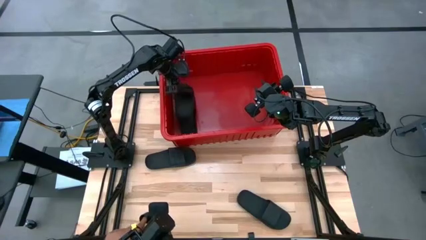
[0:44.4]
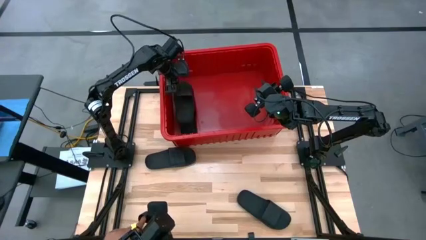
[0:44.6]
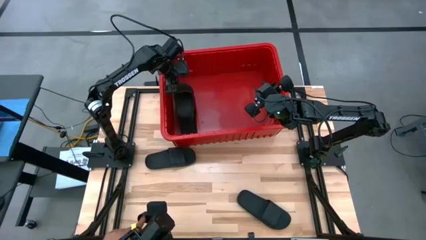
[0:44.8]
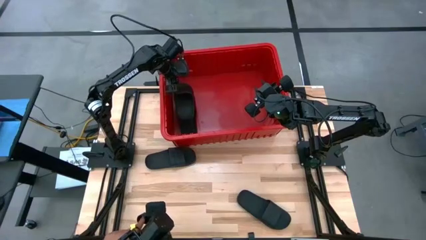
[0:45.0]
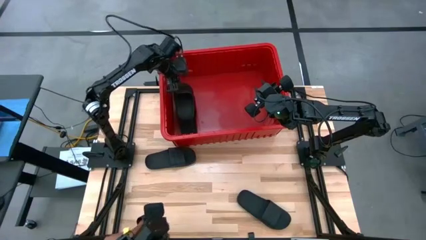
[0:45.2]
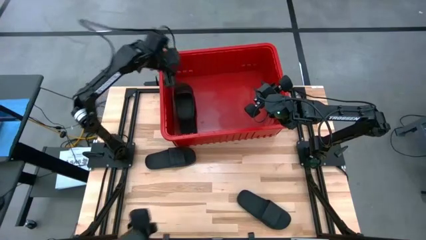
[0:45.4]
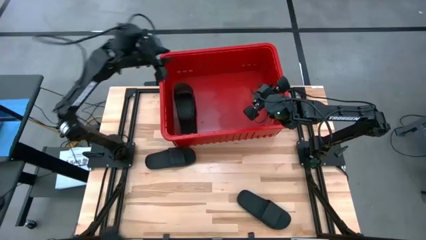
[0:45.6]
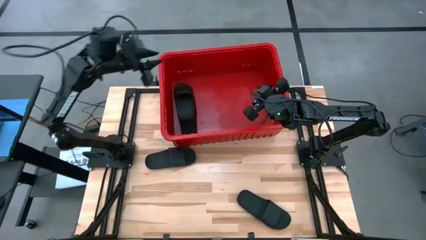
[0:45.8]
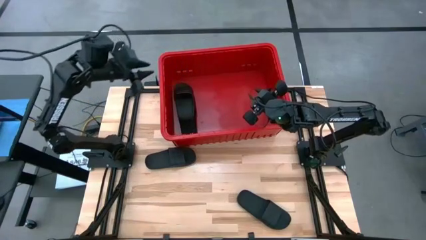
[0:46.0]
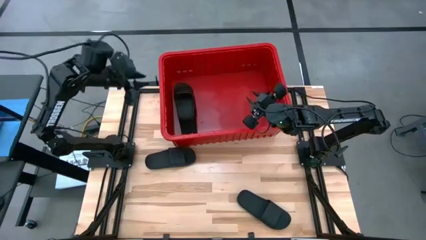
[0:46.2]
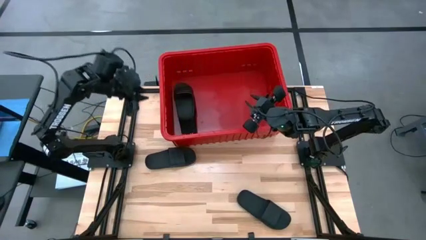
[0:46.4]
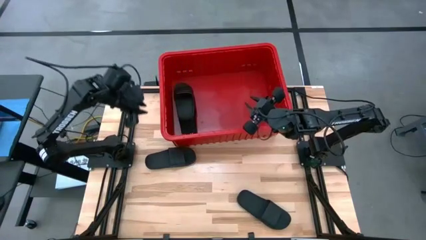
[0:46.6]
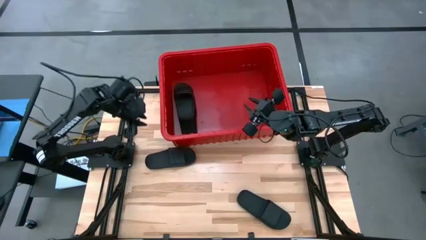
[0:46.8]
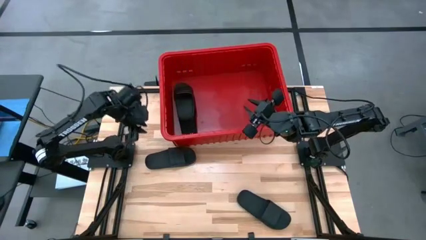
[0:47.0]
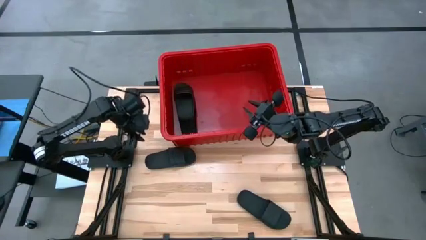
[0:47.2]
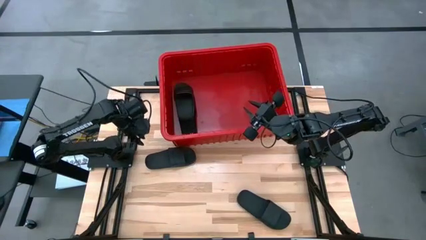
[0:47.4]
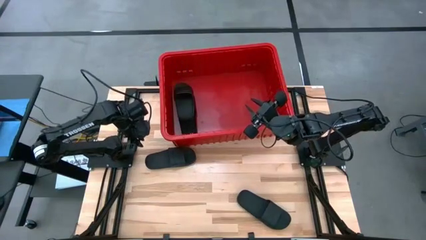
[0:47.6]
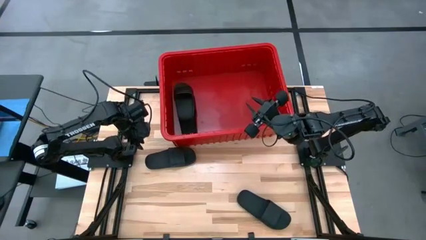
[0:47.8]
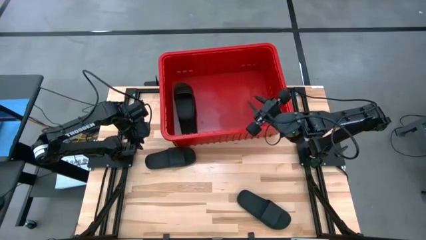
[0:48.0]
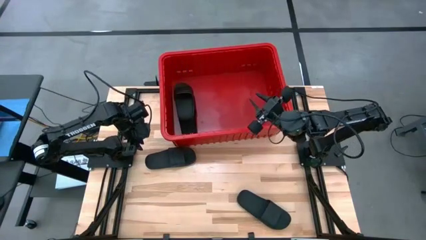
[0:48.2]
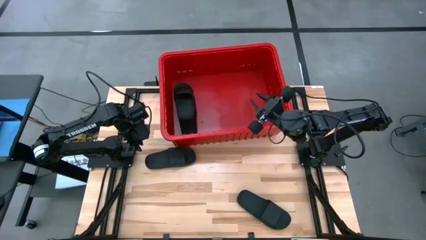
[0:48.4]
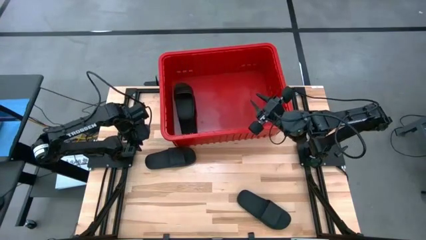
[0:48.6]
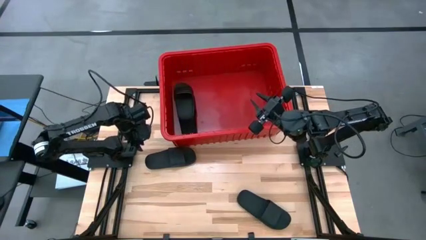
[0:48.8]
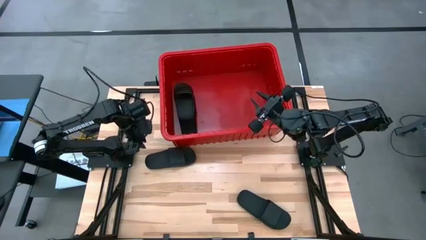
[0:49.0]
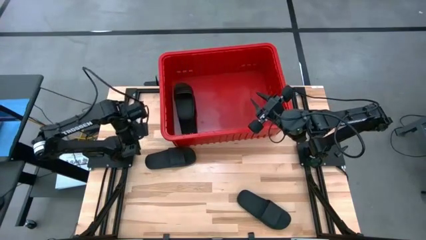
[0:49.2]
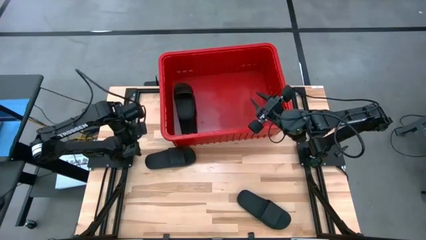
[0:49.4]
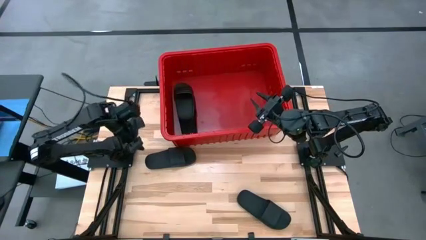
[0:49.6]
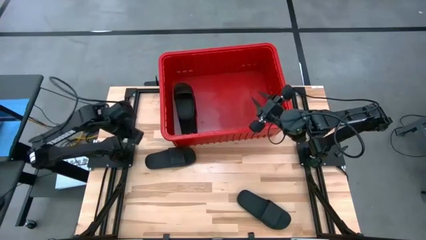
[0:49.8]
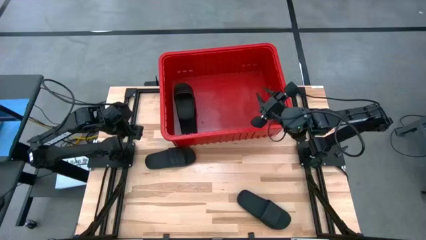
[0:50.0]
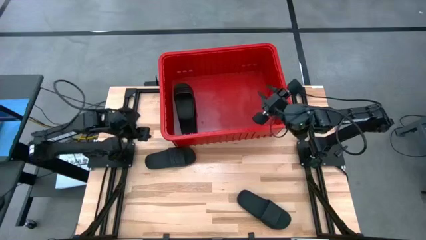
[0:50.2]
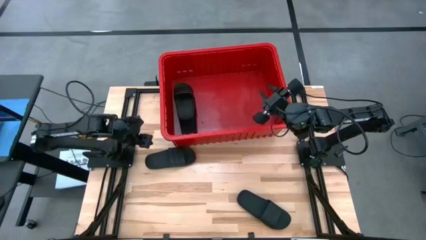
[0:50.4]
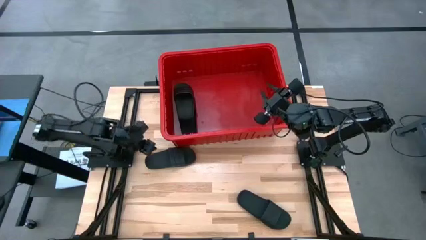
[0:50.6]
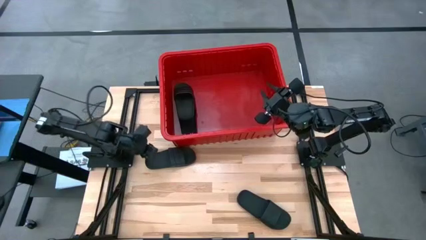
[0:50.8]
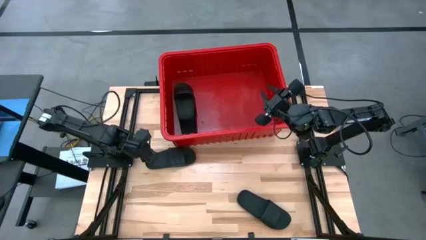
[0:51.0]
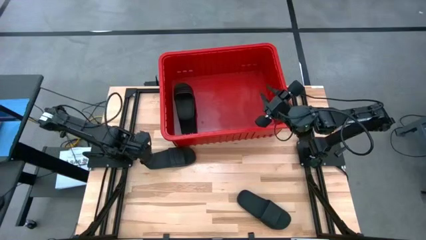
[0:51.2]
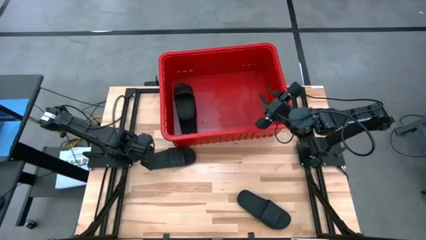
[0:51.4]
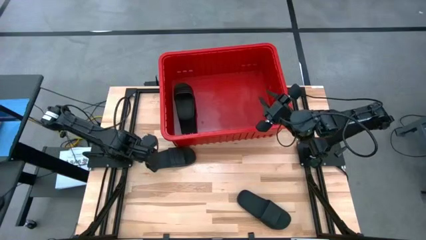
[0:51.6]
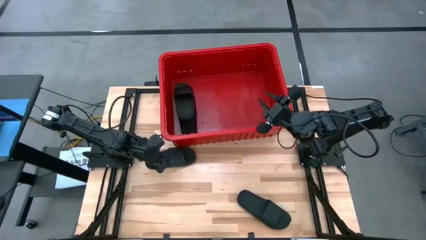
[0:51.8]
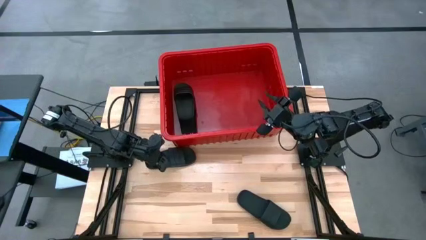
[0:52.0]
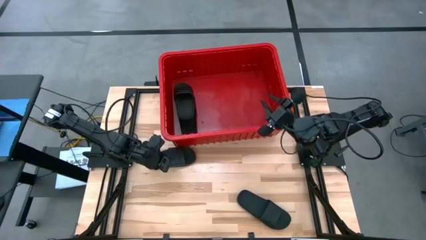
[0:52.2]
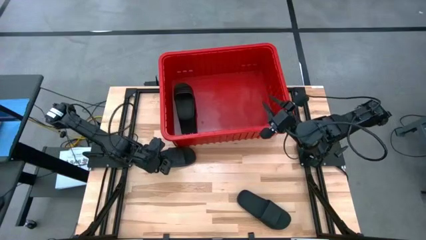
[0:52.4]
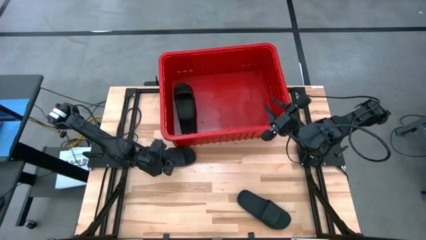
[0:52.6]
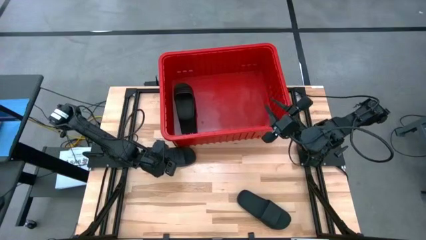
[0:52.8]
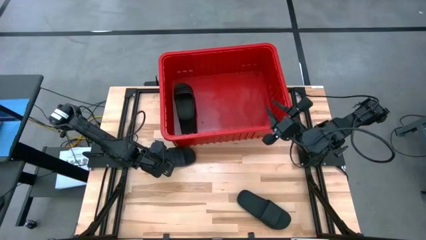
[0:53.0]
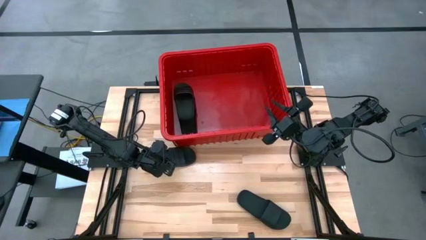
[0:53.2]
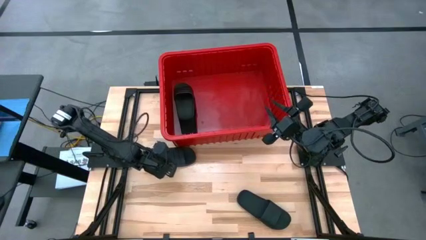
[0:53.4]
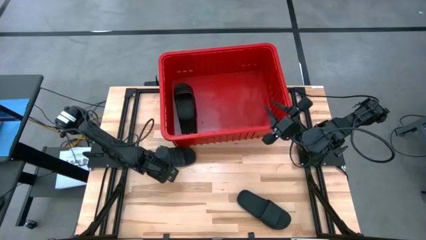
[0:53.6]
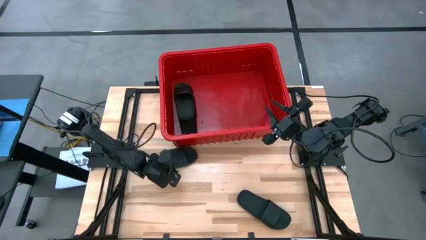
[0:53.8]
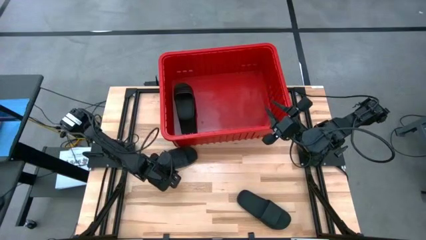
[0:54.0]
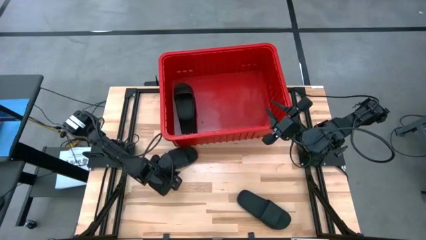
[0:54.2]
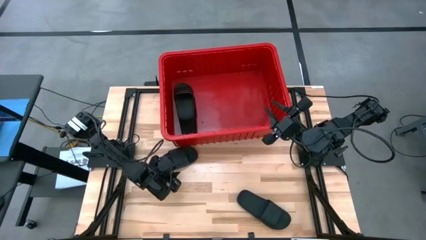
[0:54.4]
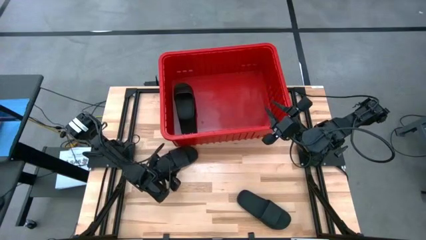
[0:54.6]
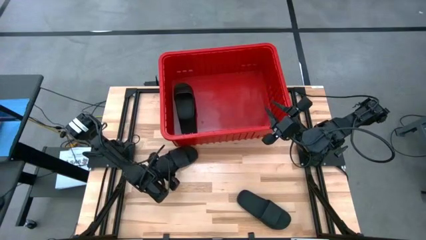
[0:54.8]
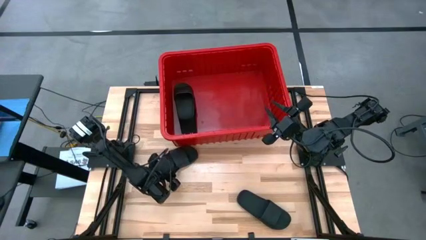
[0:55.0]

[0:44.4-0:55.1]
Task: Pick and place slides into bin
Put the black slide into the red bin
